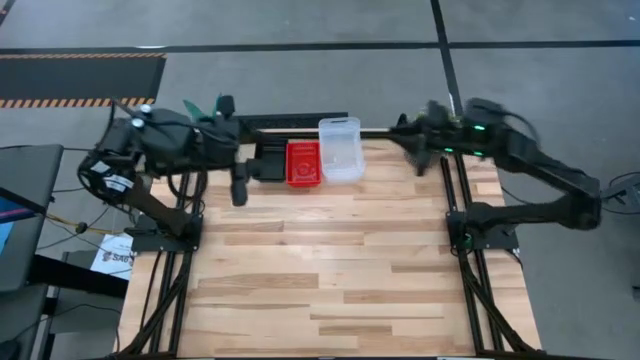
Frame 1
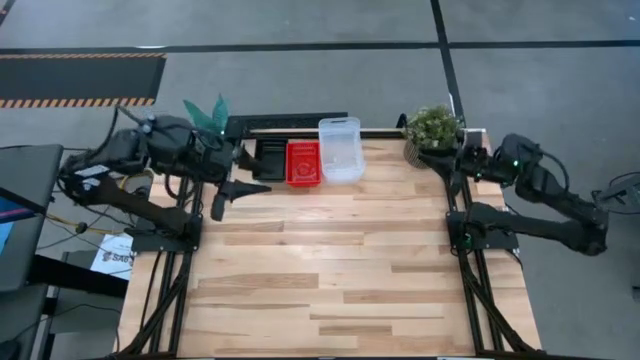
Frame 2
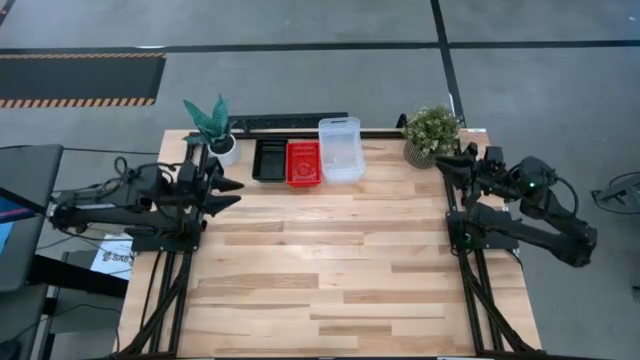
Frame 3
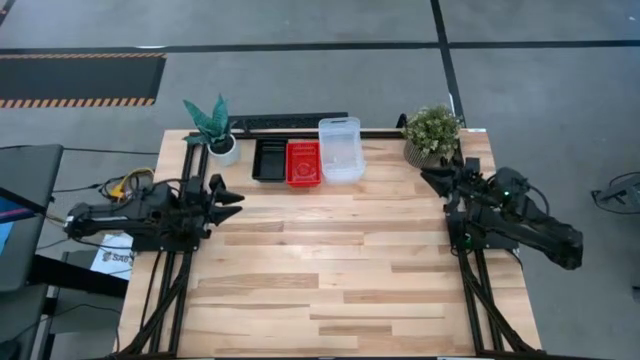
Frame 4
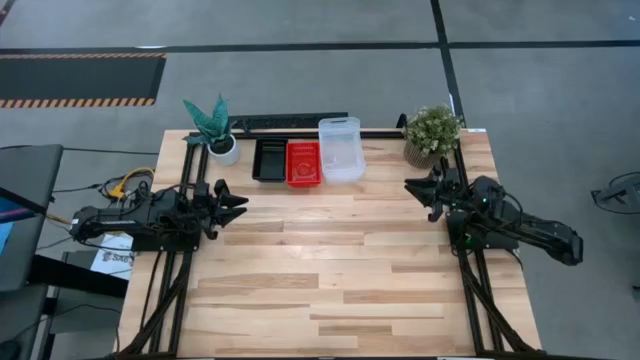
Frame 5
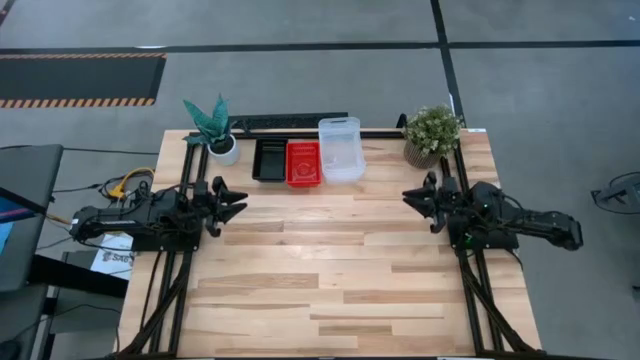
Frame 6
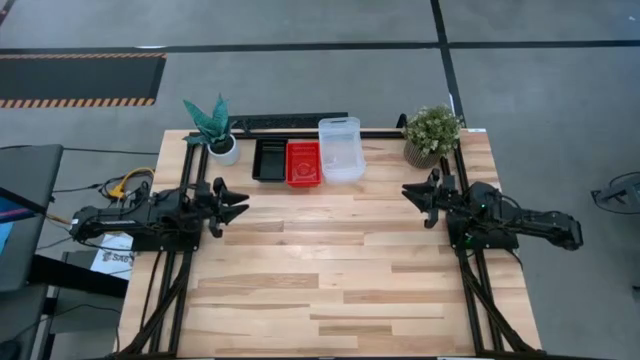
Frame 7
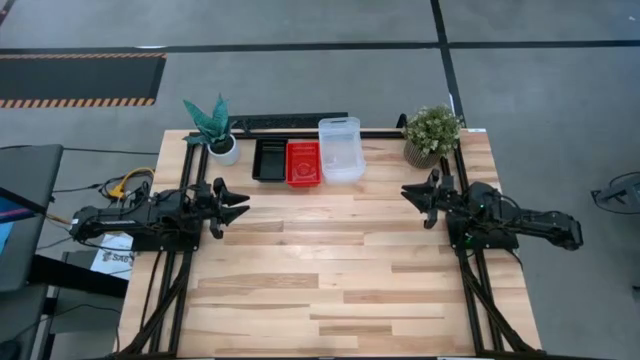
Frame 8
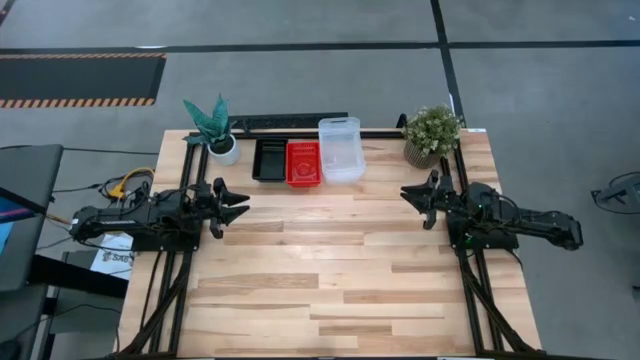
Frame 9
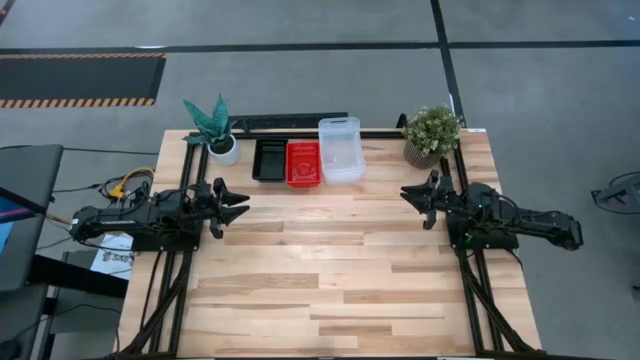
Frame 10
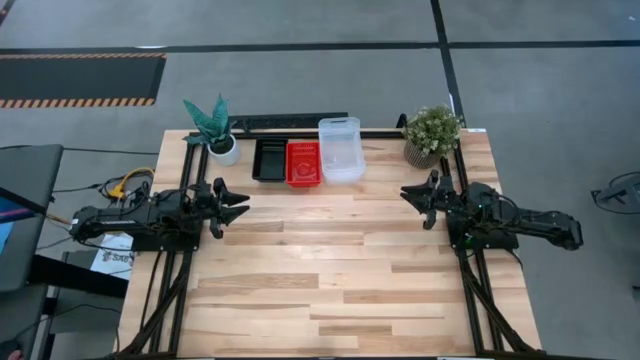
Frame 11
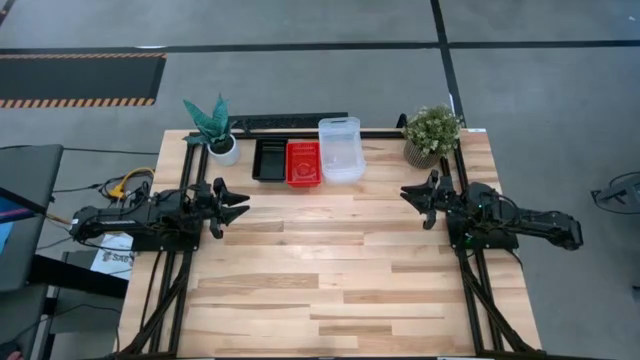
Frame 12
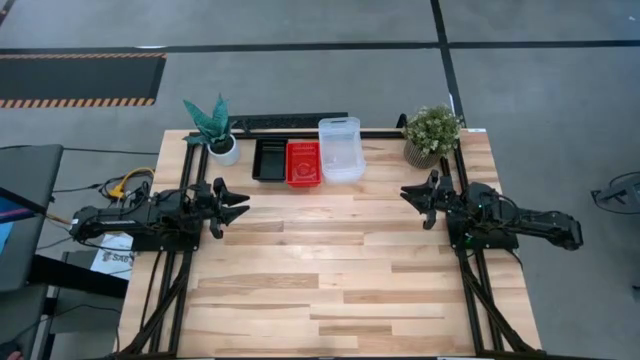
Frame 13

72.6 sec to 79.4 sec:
Return to Home Position

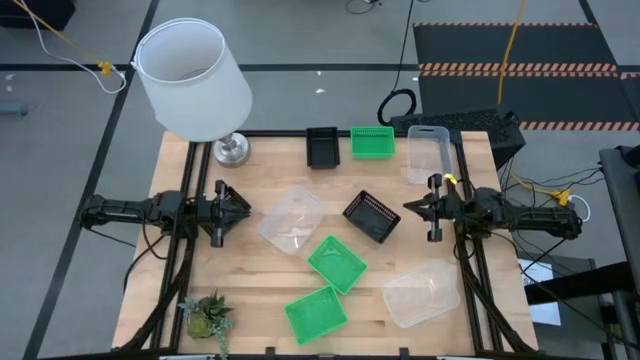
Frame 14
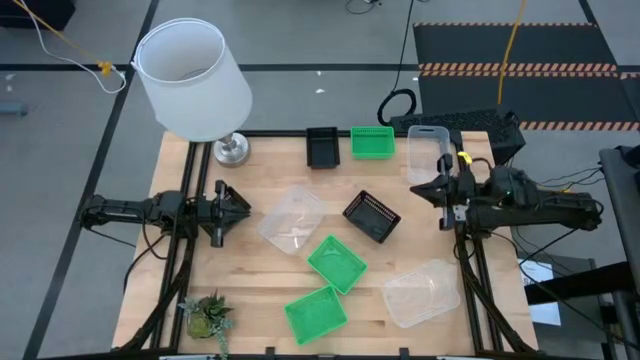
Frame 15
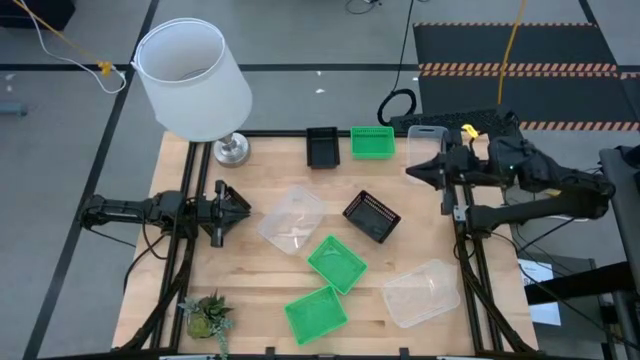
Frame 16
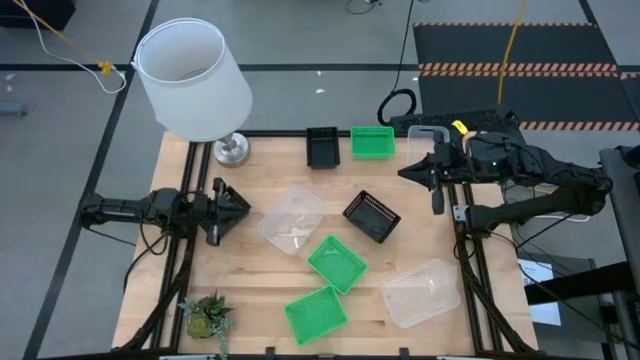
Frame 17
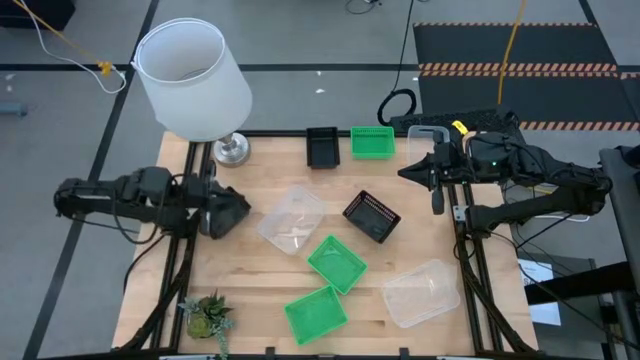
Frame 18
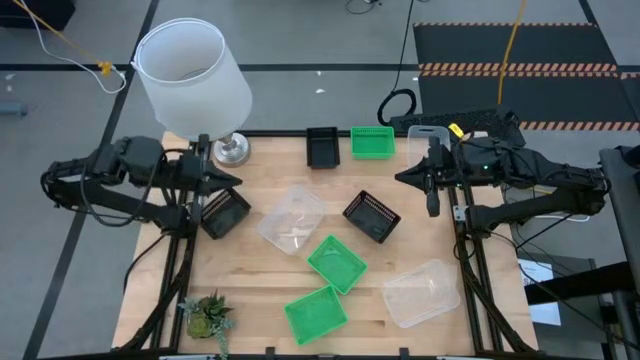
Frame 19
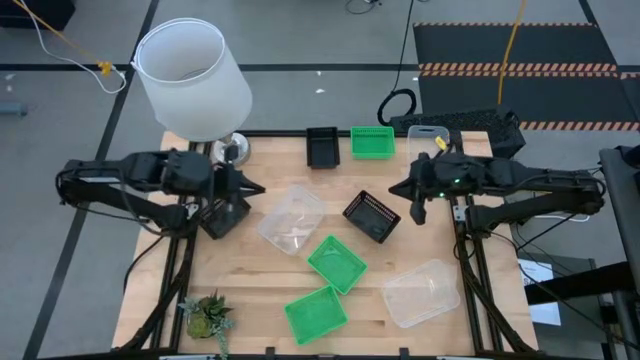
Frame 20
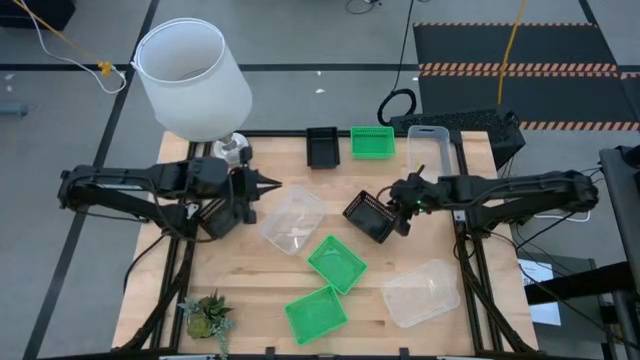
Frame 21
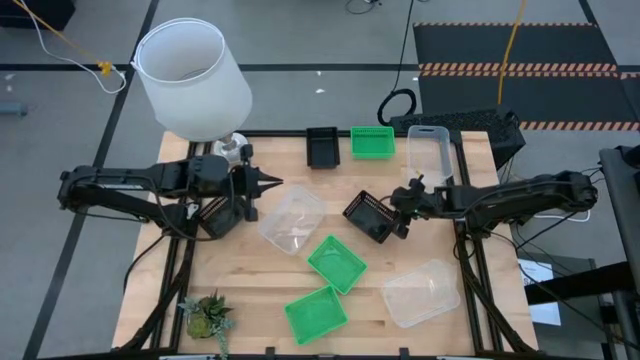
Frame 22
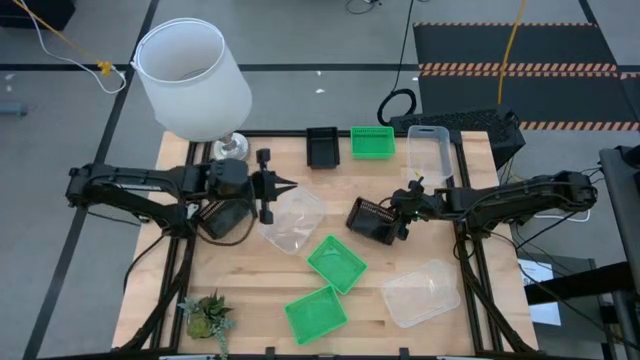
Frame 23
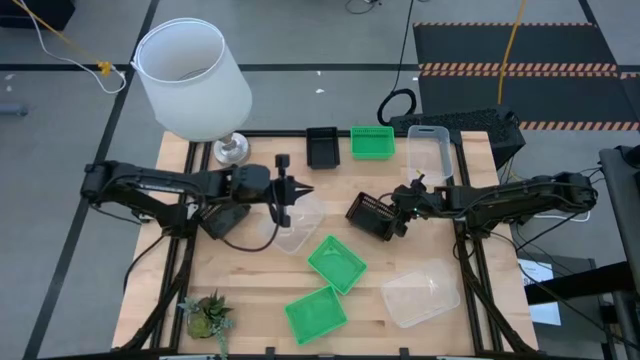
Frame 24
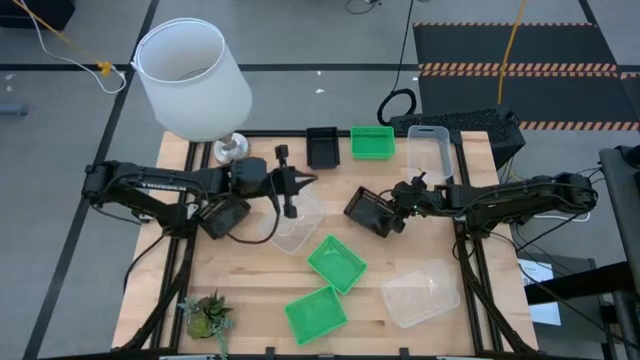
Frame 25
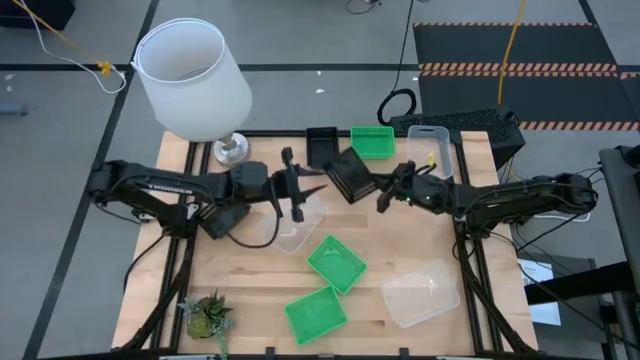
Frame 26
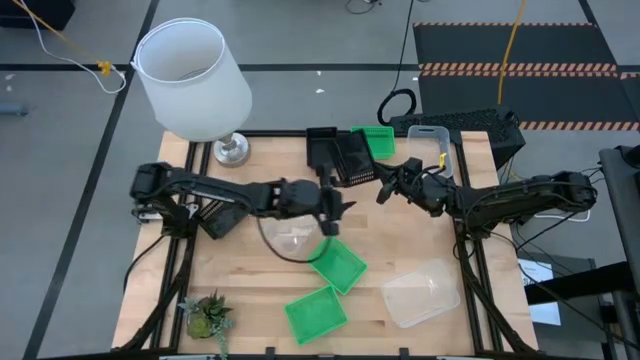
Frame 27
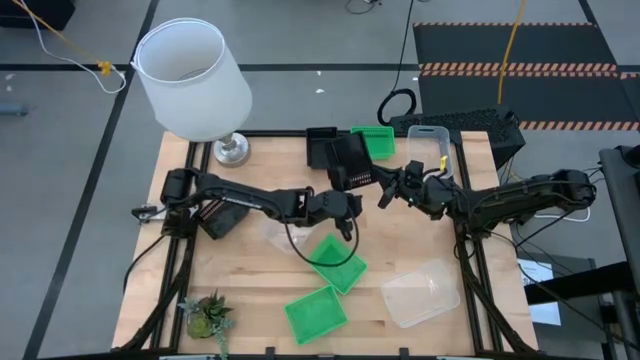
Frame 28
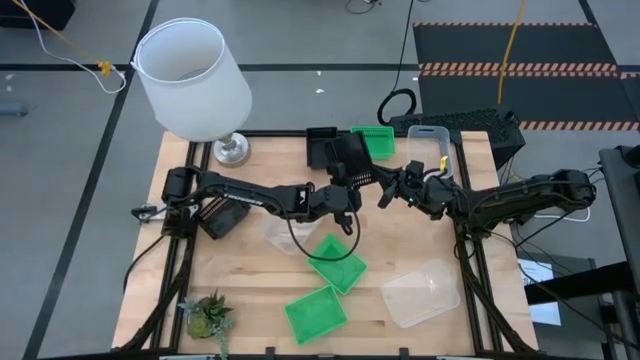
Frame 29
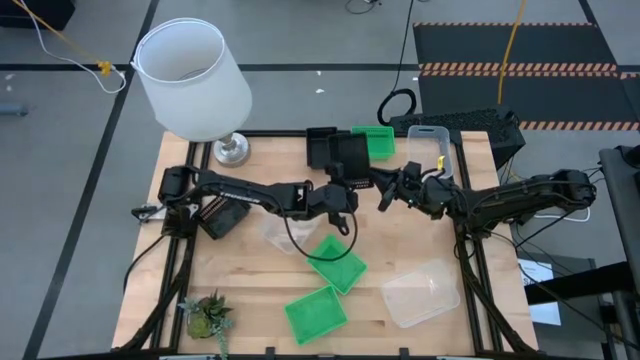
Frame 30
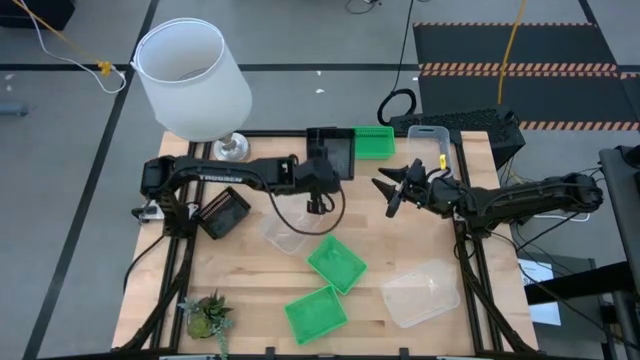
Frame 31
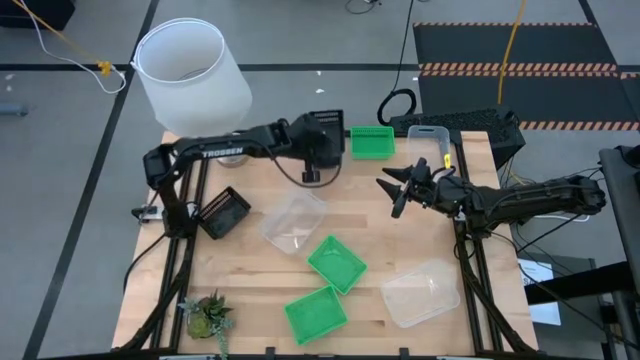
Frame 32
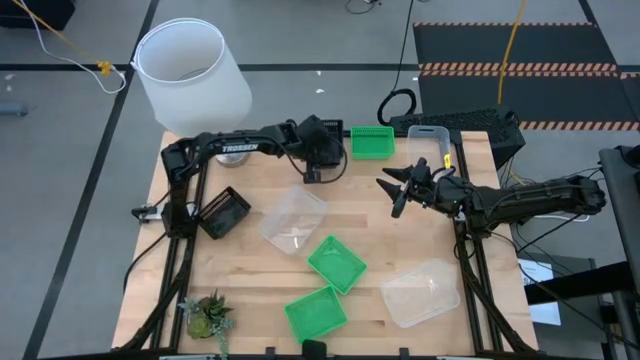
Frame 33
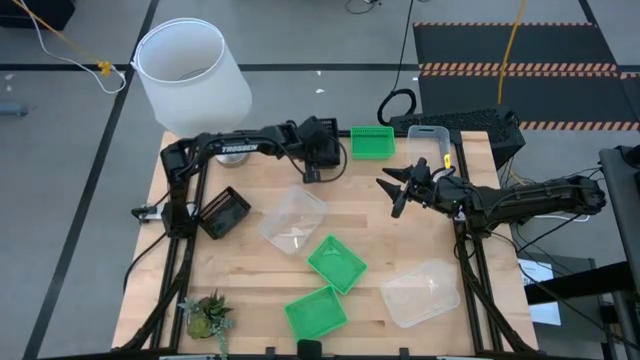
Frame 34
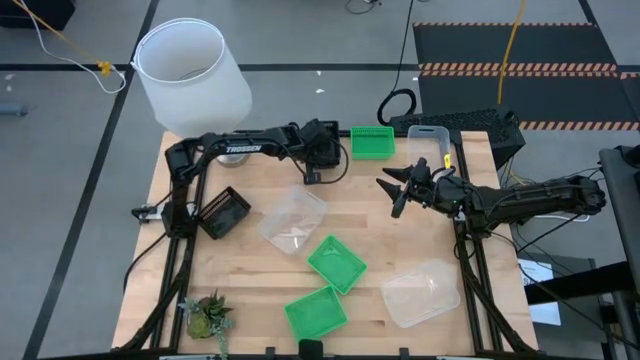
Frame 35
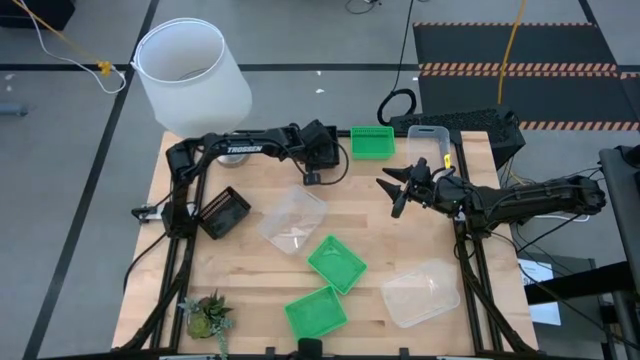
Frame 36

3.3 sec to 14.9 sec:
Stack the bottom right black bin on top of the top black bin
